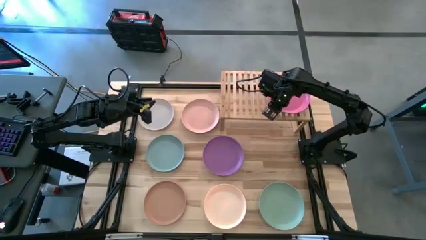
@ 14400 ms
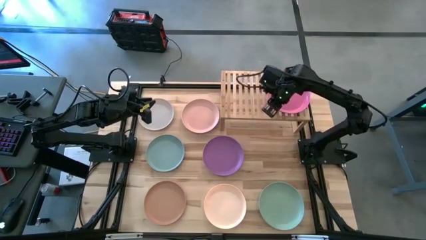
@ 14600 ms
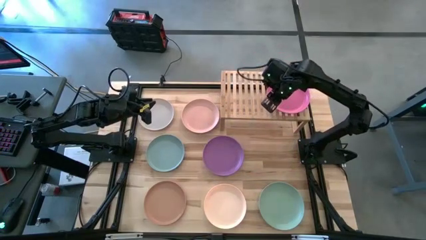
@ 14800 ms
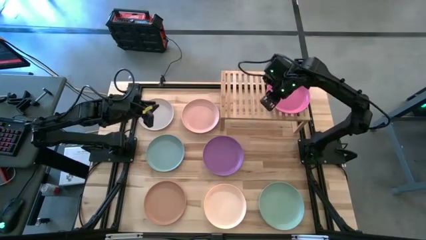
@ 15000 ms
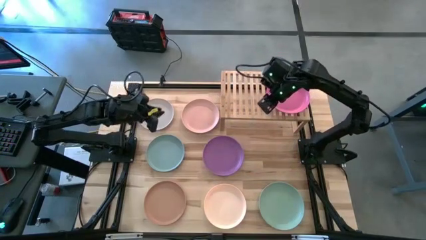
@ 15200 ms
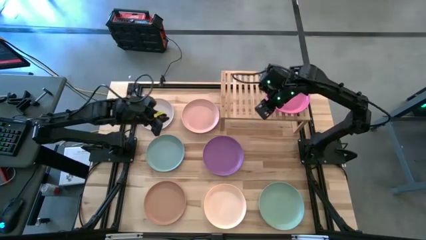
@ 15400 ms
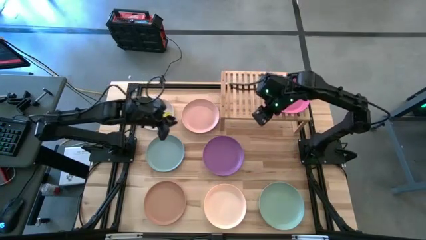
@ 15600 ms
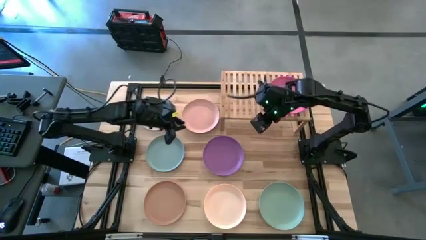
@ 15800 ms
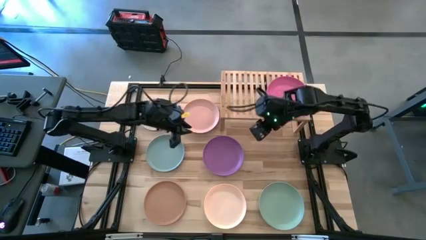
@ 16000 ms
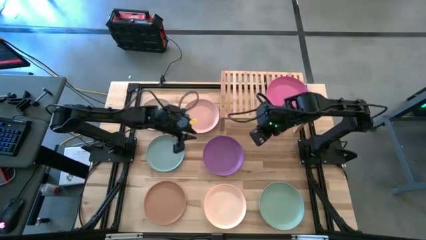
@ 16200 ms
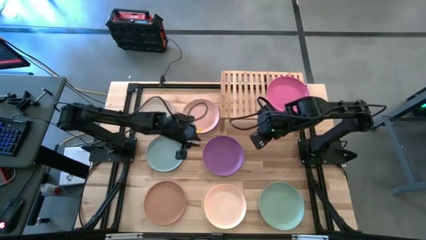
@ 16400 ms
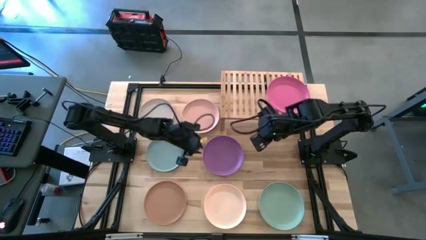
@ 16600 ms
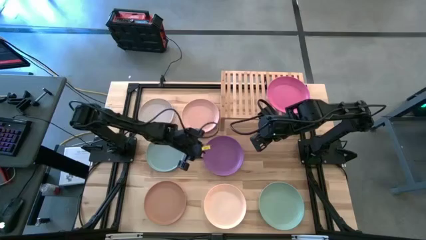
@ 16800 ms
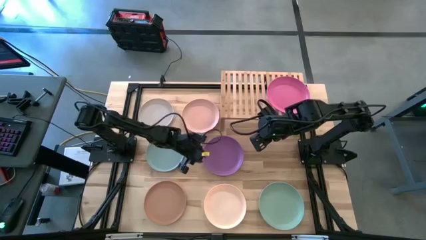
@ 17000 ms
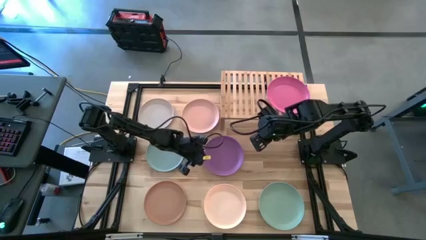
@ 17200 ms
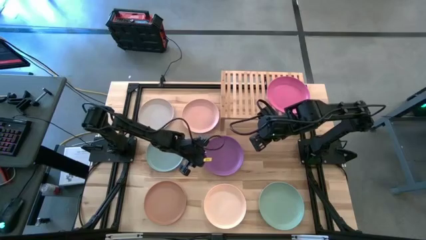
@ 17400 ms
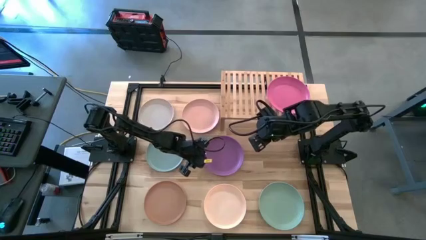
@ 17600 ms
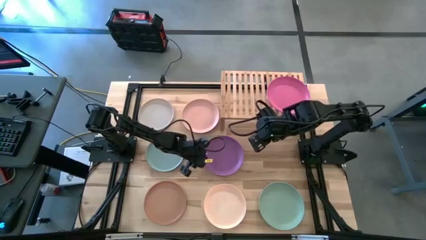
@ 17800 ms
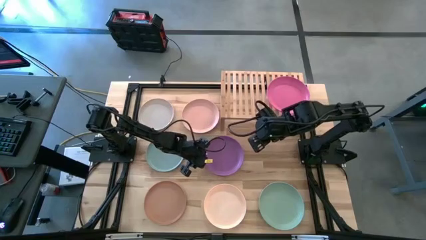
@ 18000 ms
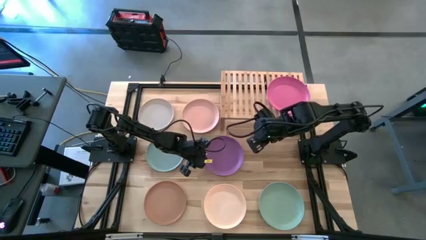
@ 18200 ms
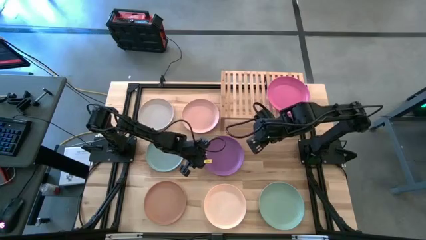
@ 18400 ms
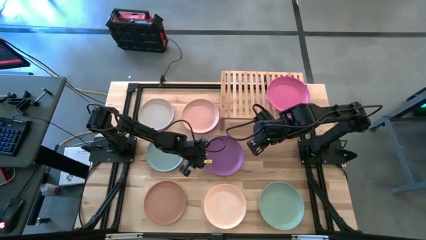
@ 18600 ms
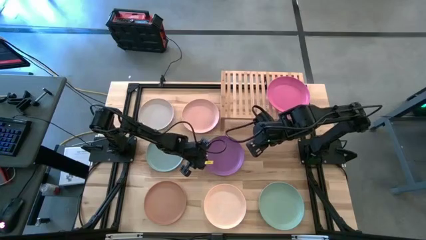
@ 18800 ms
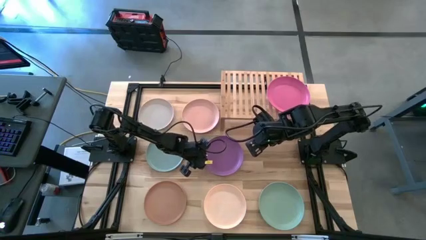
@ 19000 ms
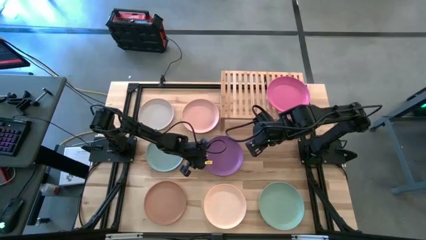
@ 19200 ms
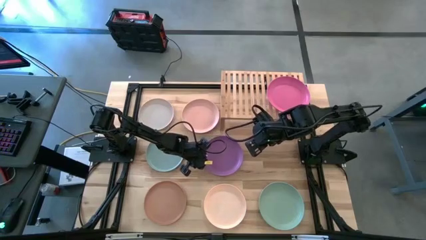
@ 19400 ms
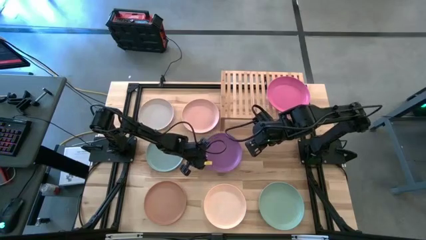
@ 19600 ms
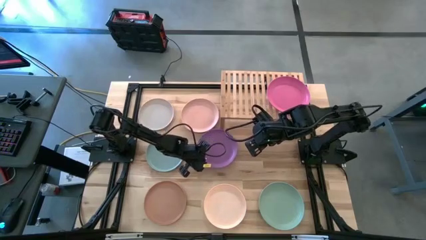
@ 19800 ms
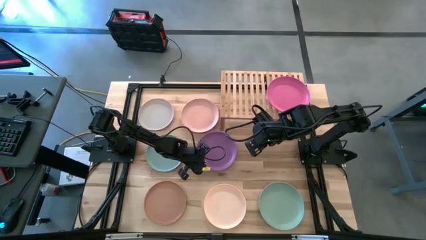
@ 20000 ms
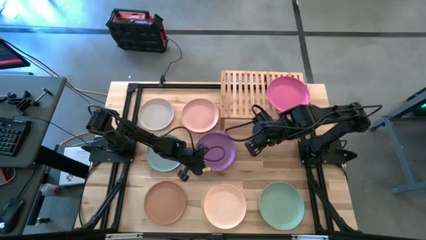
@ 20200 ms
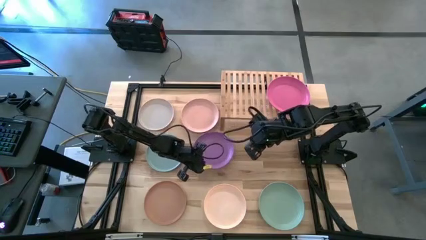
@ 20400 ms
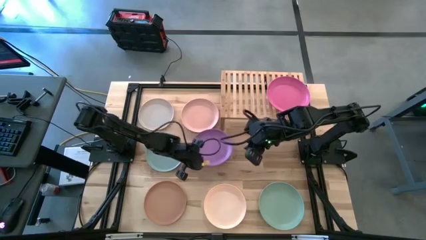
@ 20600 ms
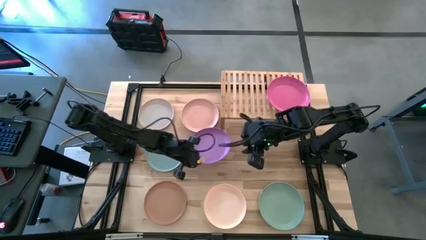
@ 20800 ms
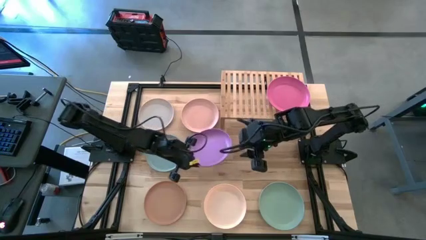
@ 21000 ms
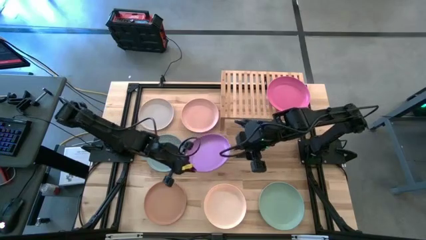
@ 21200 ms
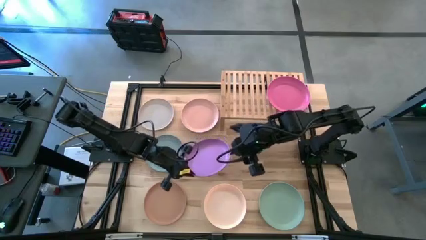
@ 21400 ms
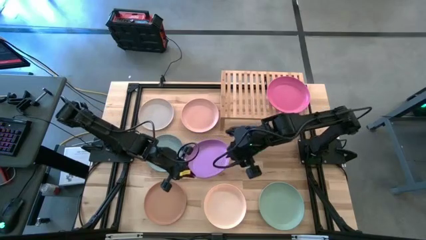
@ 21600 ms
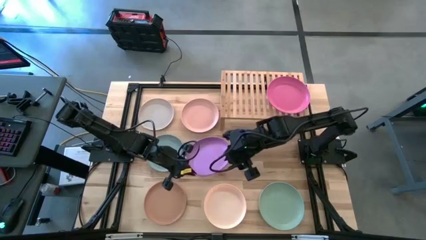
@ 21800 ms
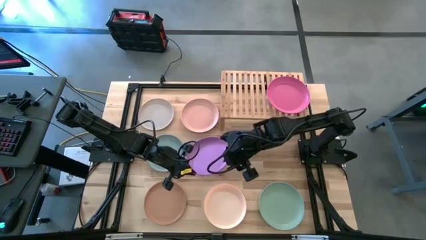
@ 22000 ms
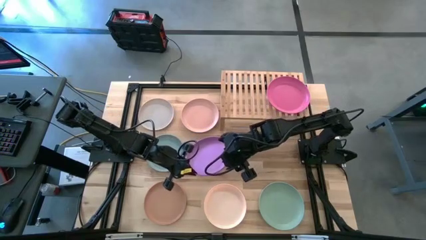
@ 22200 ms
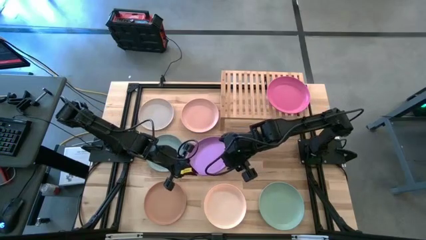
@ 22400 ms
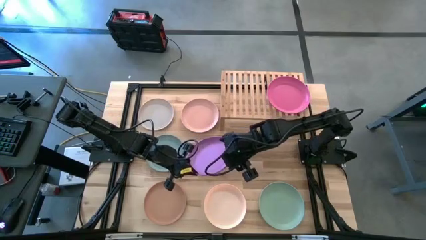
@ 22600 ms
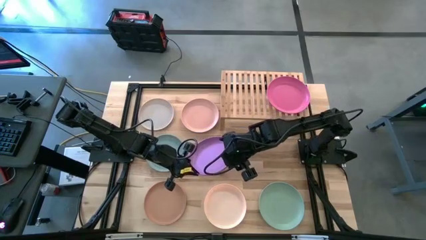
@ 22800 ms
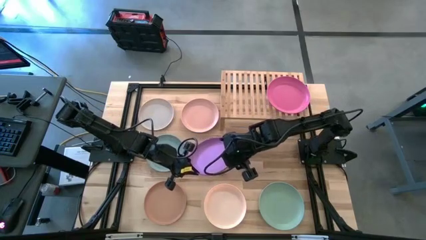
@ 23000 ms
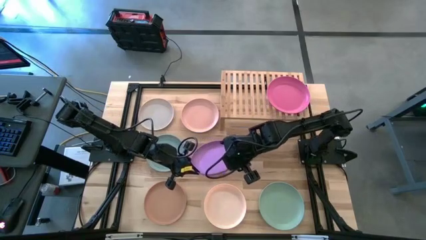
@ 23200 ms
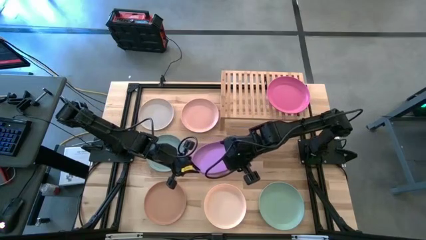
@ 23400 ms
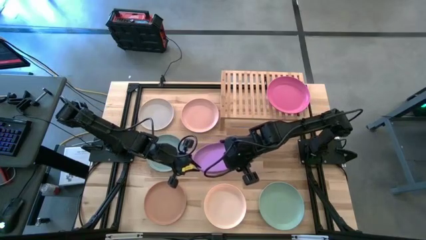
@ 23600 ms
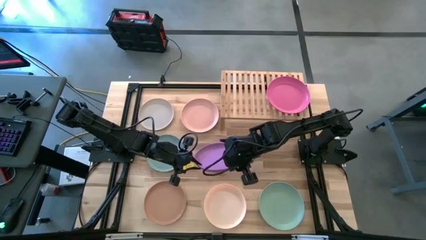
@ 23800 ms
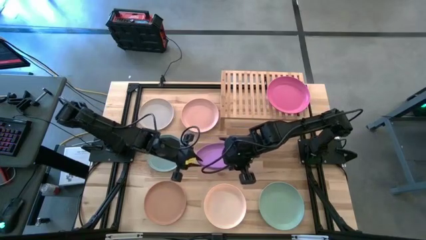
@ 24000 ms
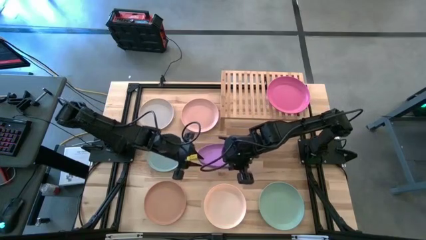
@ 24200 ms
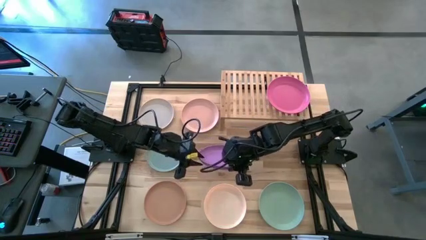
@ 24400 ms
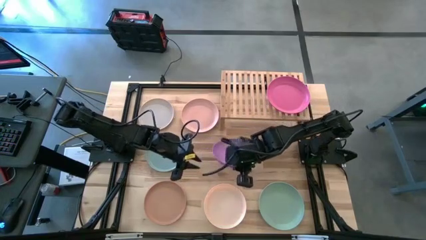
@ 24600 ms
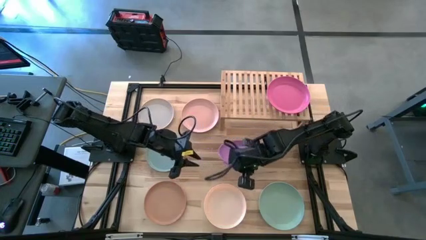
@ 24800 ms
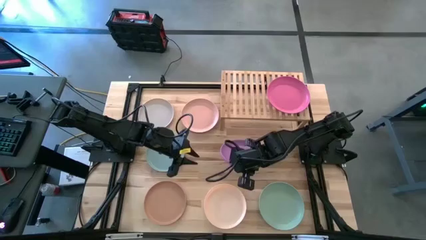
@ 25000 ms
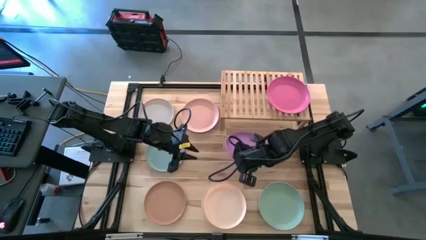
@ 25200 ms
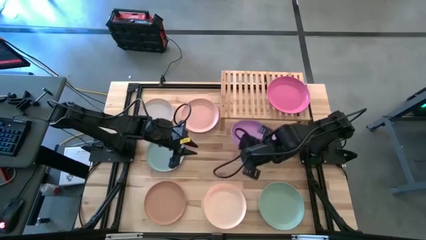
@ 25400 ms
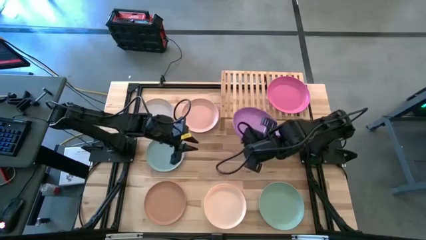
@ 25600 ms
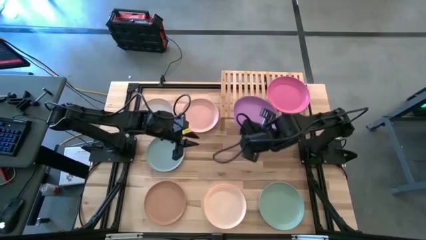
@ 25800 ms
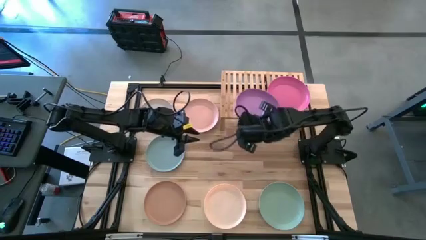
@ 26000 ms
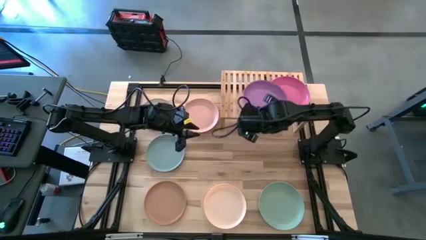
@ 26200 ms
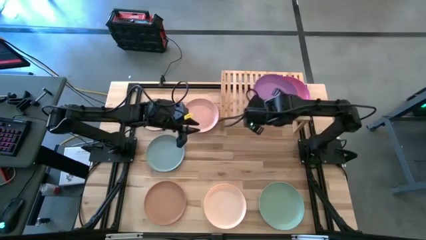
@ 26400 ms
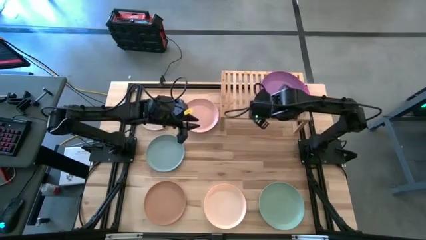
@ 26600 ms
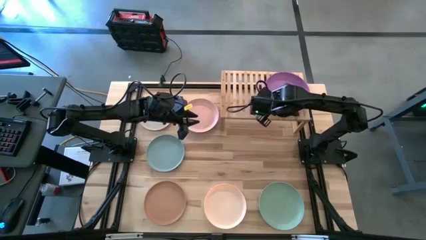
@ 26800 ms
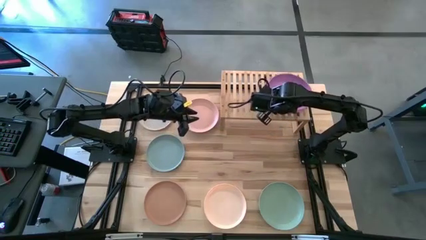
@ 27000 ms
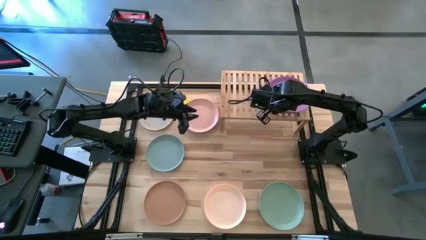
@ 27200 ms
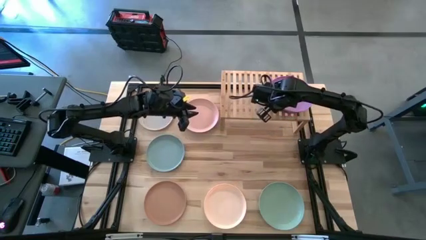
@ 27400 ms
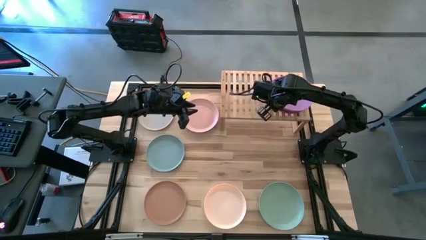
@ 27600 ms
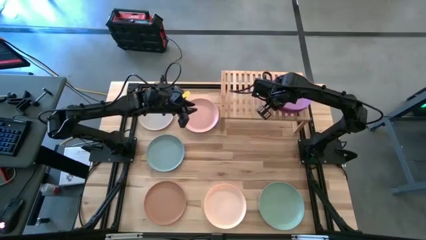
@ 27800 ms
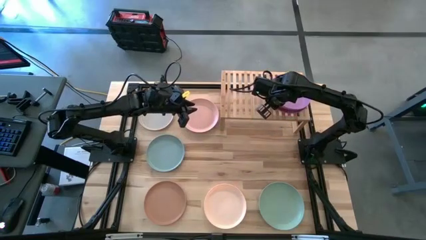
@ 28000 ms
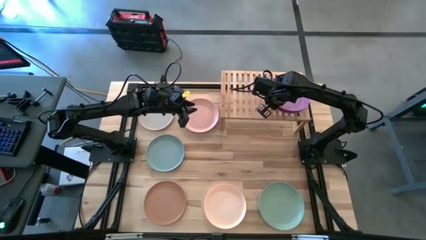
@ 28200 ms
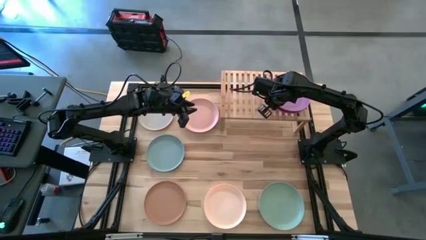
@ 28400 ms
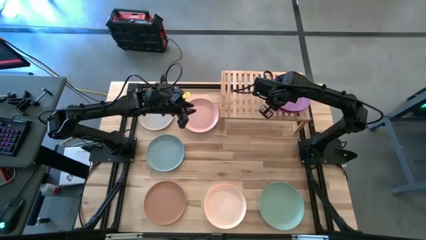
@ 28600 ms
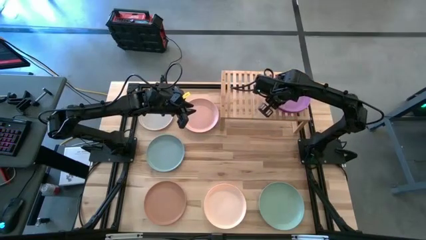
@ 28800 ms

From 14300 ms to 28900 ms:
Task: Place and stack plates onto a shelf
Stack the violet plate on top of the pink plate on the shelf
